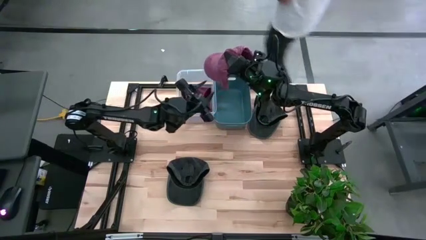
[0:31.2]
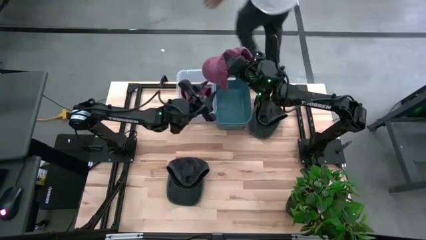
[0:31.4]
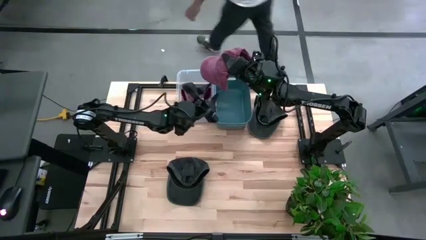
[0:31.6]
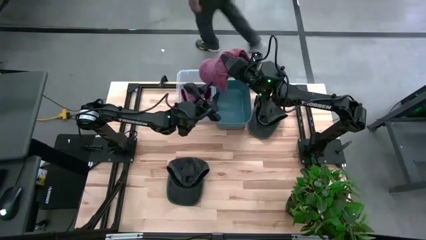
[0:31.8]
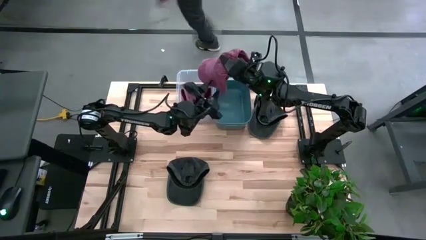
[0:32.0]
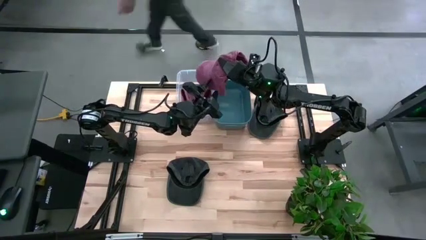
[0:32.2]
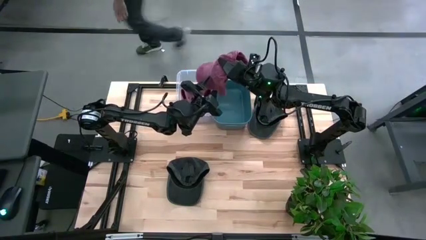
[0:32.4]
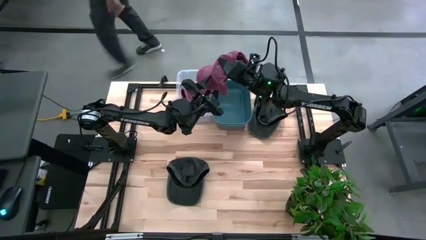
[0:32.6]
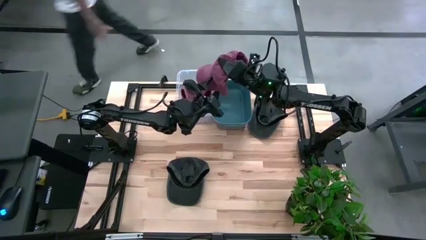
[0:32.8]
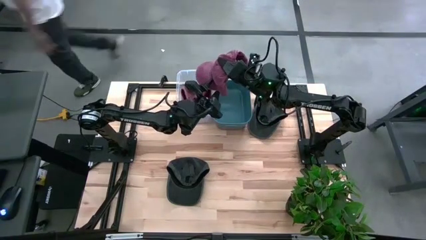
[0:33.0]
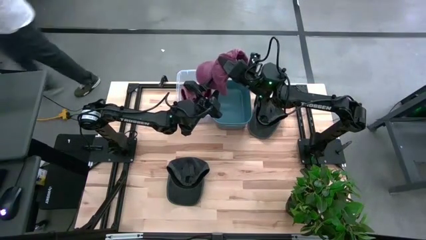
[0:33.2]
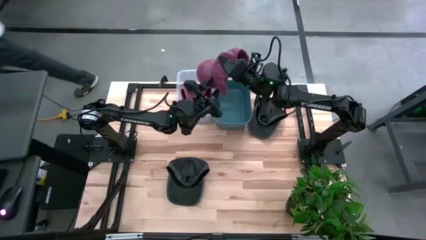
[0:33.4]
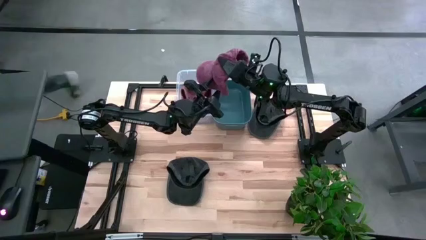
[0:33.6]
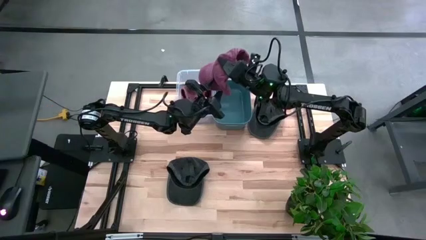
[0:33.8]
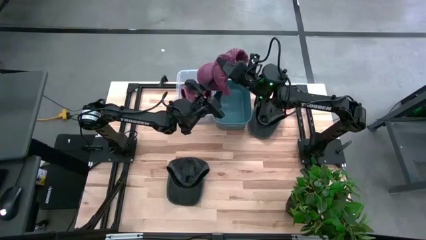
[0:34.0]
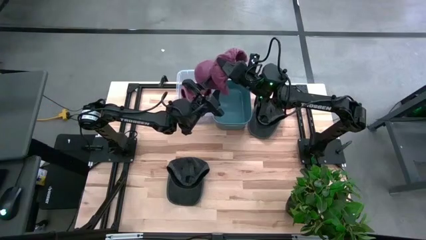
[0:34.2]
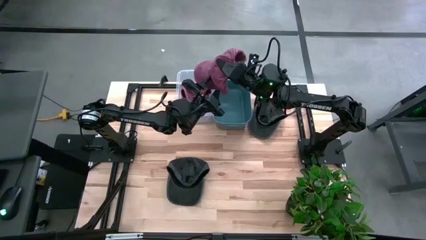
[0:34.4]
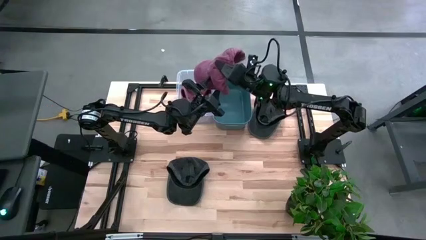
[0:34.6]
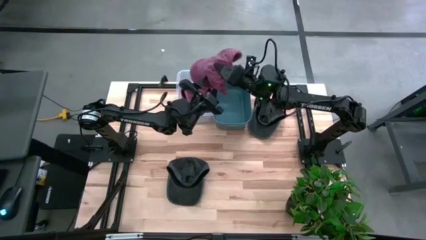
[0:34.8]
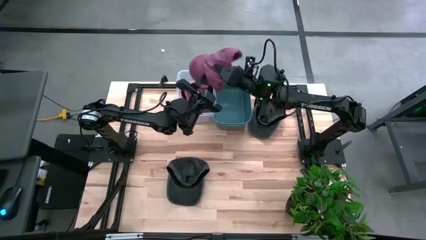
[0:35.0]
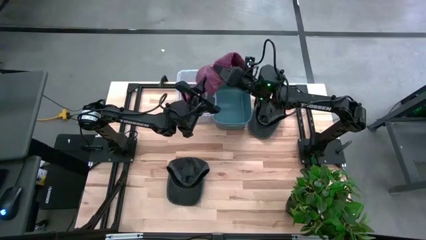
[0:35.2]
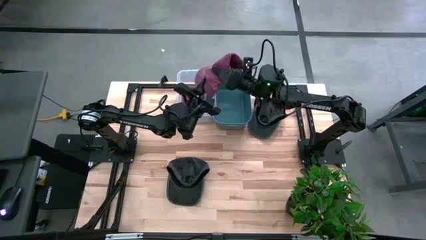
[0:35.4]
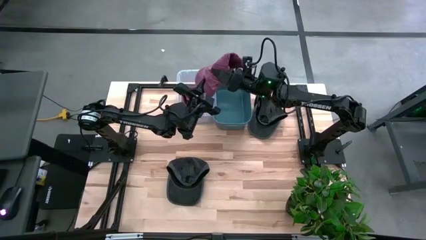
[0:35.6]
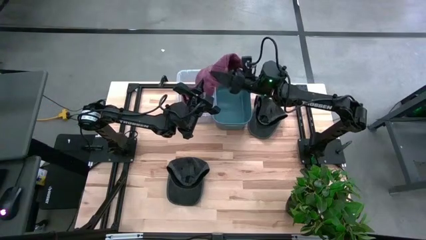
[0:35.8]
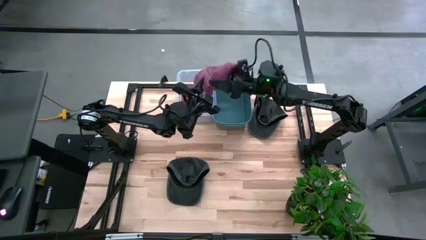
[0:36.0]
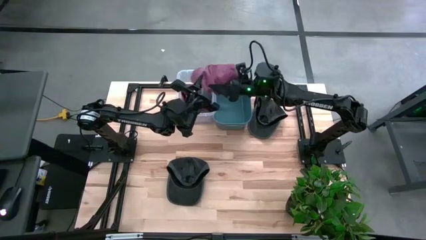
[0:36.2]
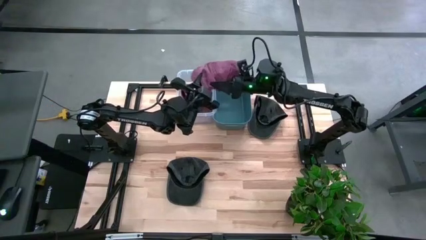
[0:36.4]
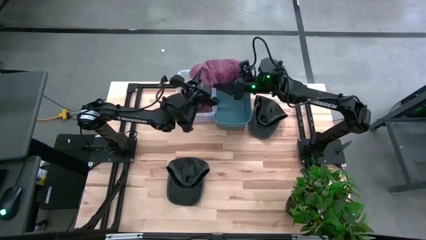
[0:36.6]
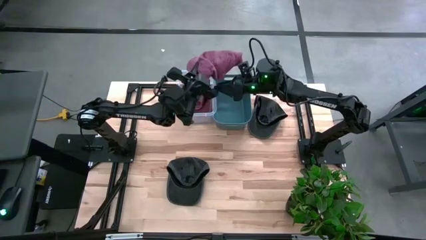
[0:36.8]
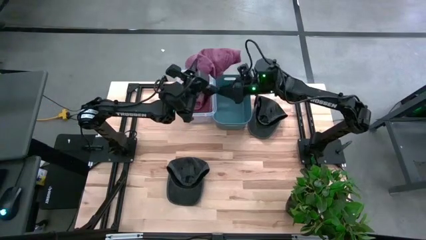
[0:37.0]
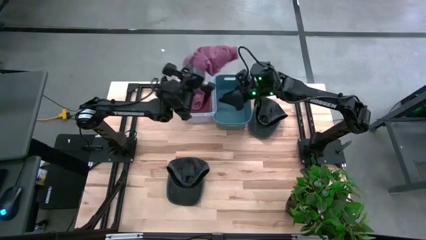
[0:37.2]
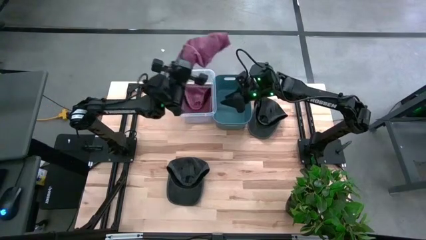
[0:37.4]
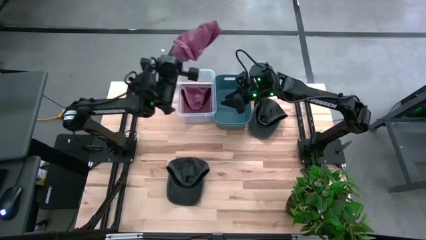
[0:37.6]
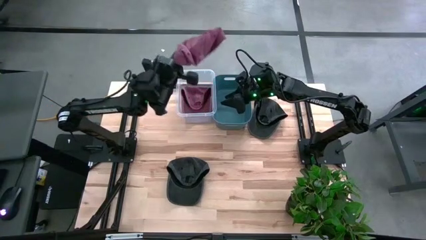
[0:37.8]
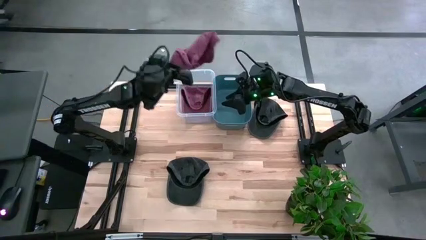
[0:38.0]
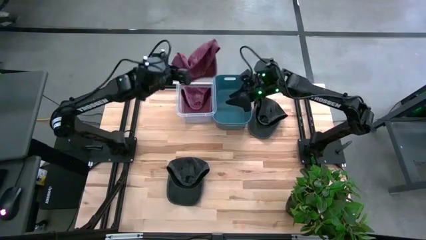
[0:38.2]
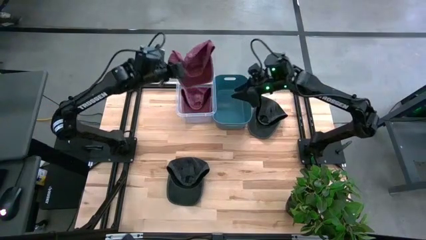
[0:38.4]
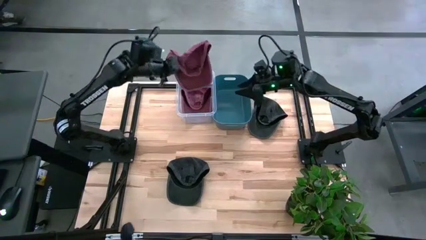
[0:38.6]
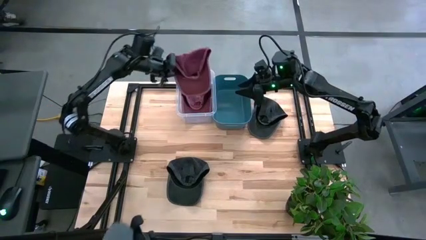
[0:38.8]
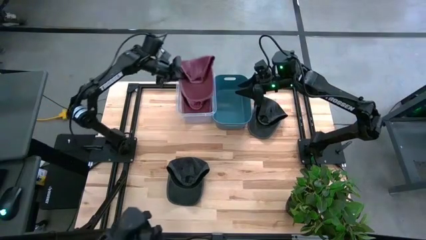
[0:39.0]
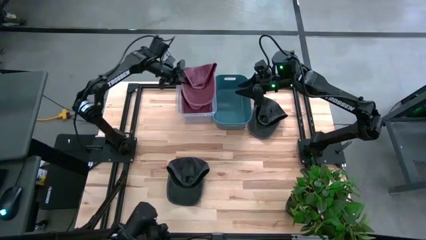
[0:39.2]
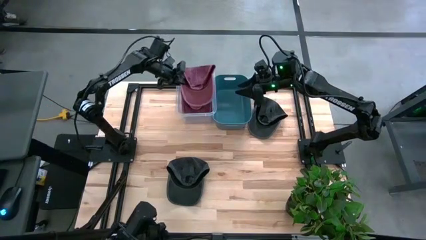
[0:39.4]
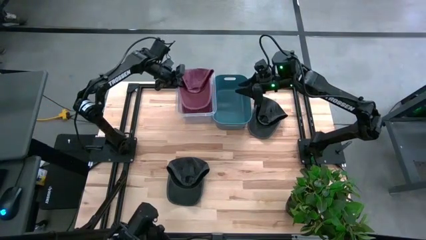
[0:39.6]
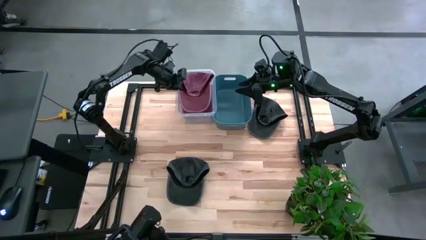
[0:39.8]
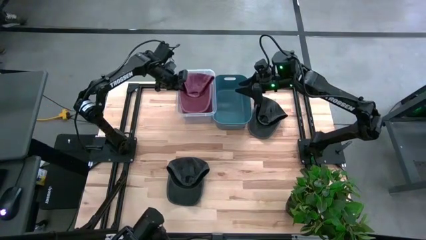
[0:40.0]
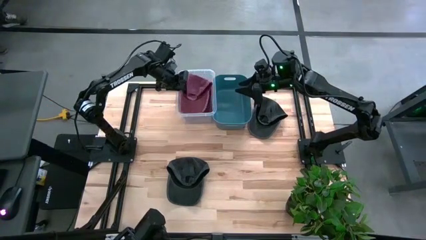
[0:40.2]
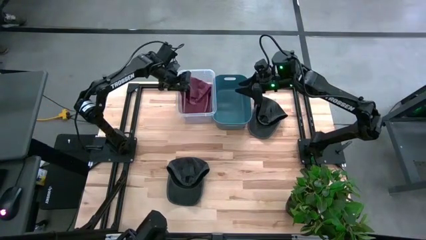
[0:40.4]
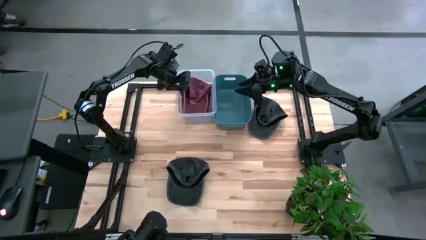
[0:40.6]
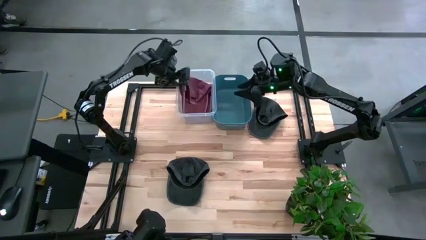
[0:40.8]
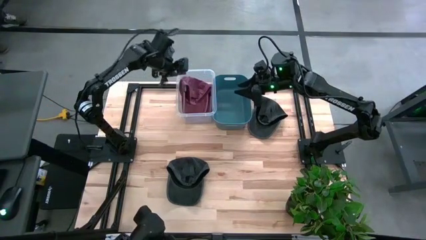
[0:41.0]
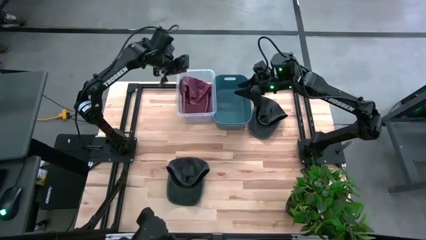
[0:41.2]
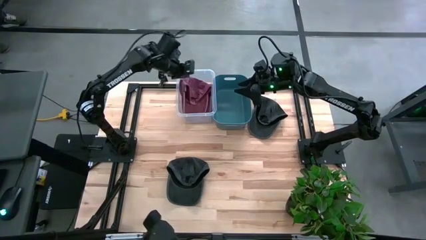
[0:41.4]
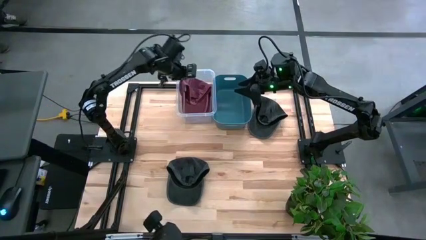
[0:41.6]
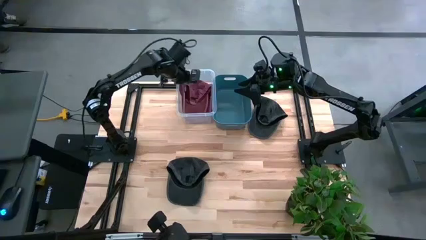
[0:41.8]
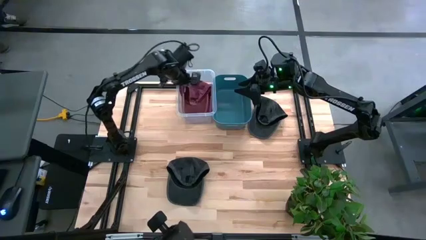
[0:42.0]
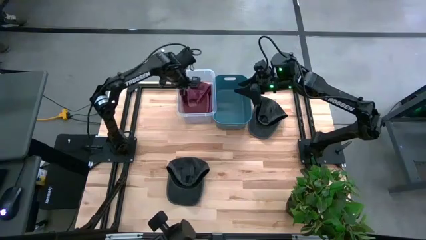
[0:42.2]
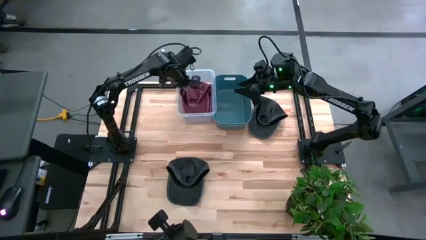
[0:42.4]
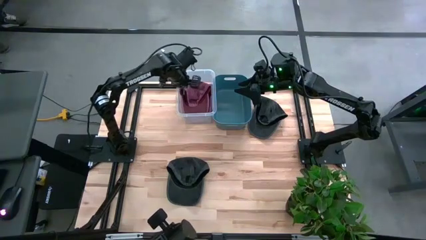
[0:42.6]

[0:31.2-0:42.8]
Task: Pick & Place hat
Put the red cap into the transparent bin
